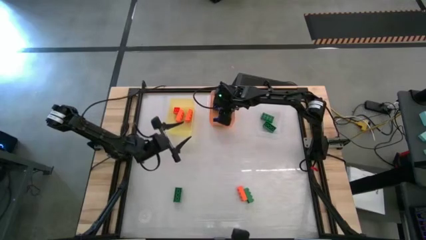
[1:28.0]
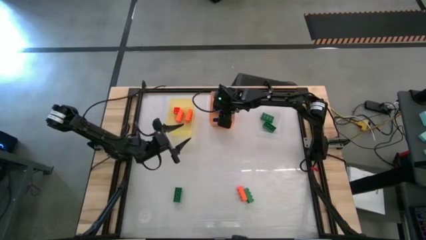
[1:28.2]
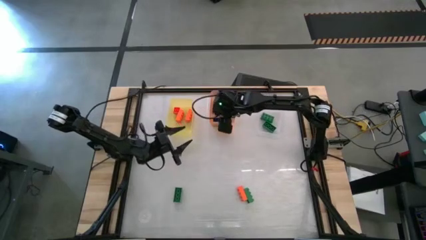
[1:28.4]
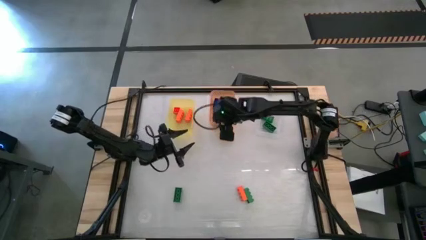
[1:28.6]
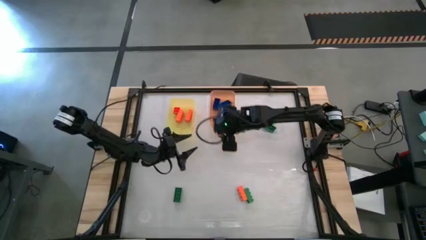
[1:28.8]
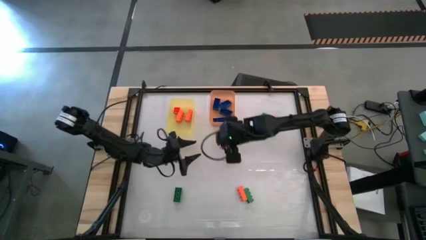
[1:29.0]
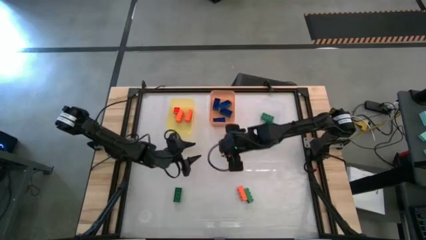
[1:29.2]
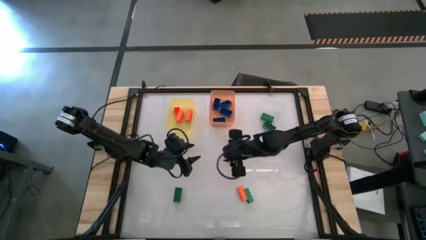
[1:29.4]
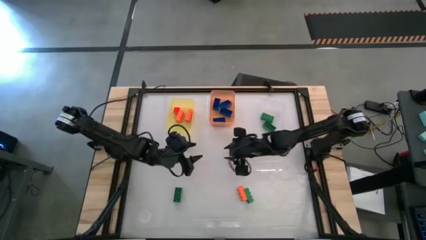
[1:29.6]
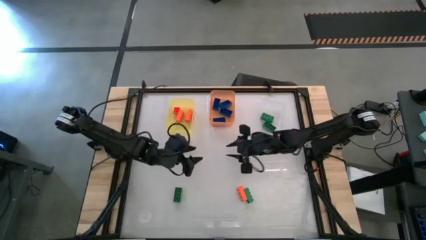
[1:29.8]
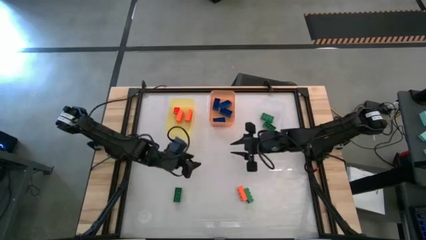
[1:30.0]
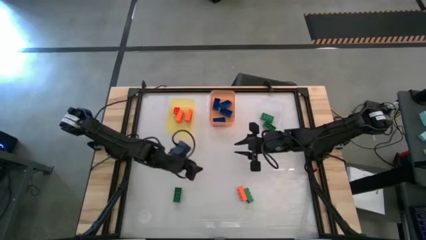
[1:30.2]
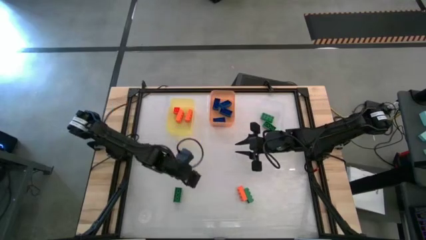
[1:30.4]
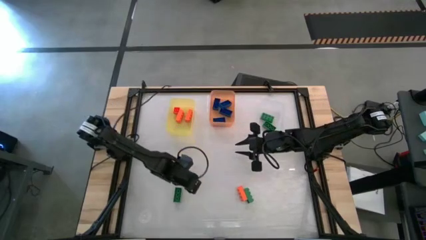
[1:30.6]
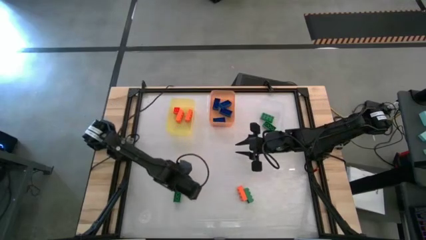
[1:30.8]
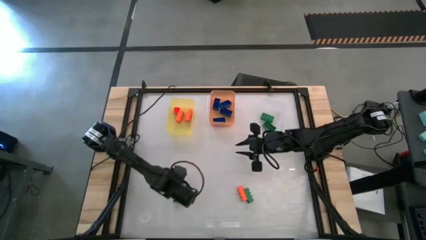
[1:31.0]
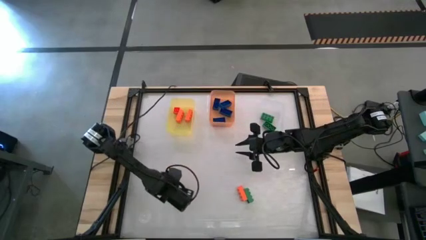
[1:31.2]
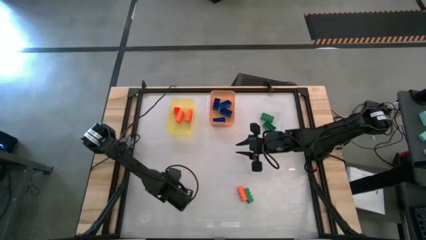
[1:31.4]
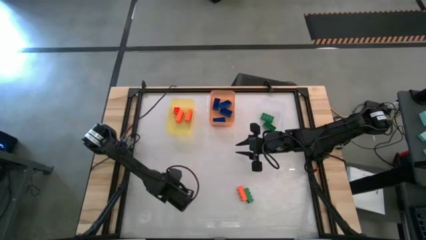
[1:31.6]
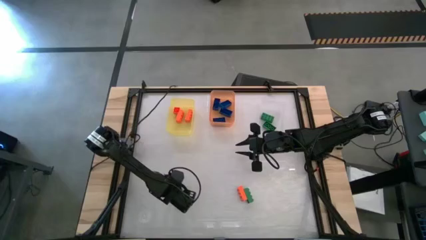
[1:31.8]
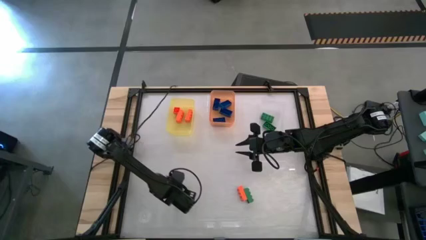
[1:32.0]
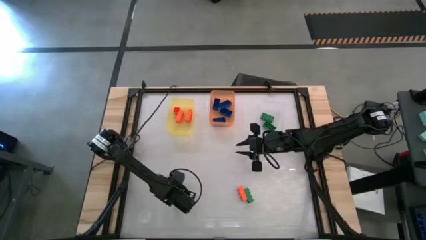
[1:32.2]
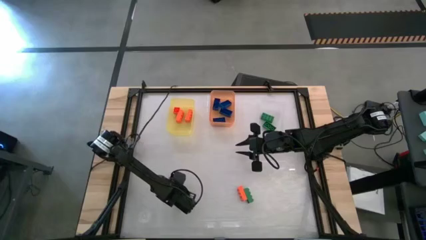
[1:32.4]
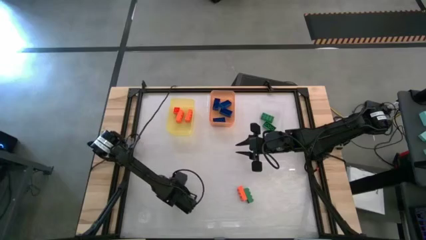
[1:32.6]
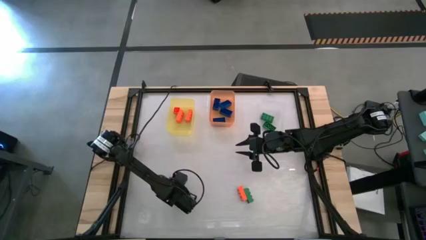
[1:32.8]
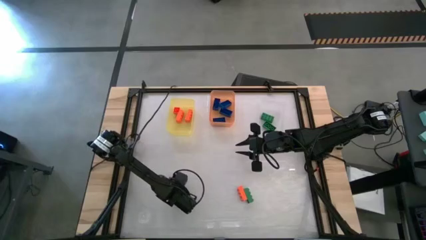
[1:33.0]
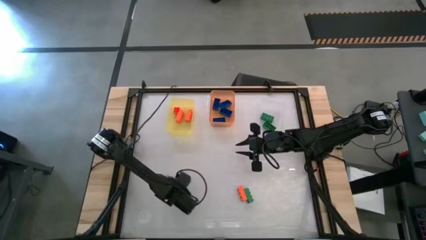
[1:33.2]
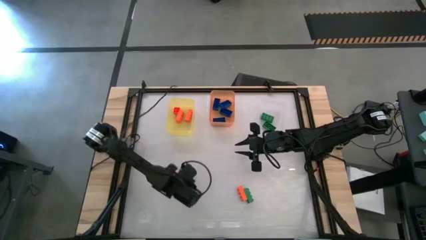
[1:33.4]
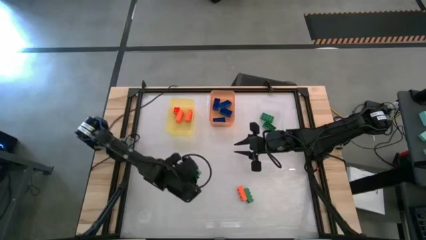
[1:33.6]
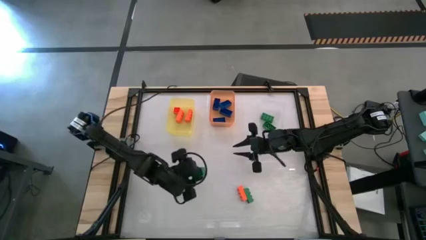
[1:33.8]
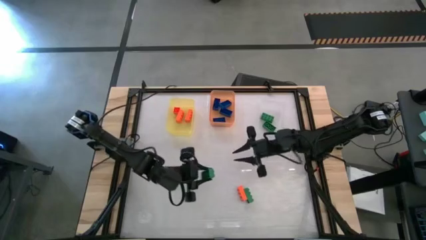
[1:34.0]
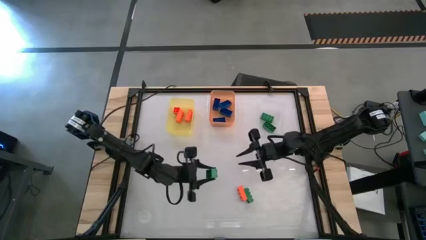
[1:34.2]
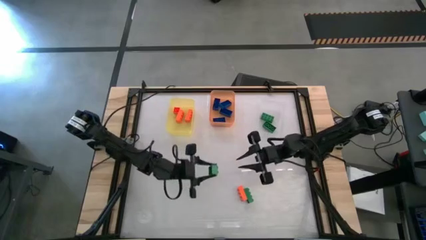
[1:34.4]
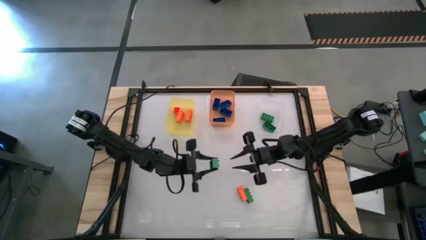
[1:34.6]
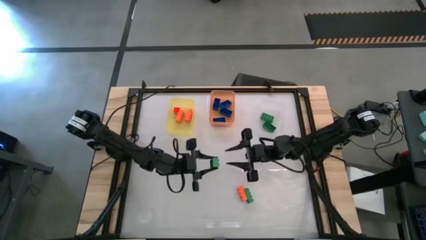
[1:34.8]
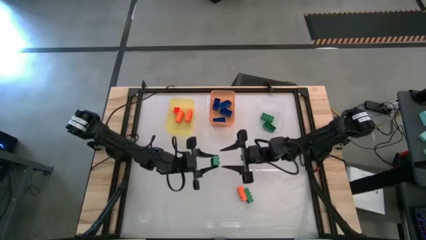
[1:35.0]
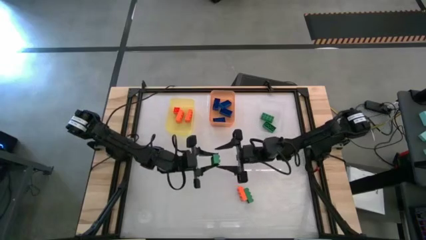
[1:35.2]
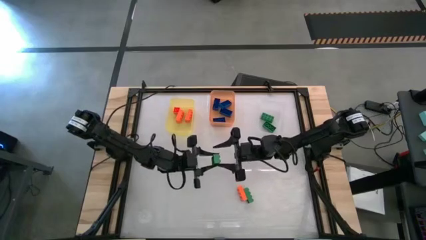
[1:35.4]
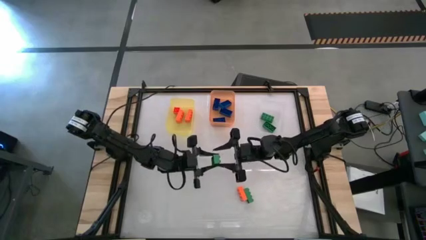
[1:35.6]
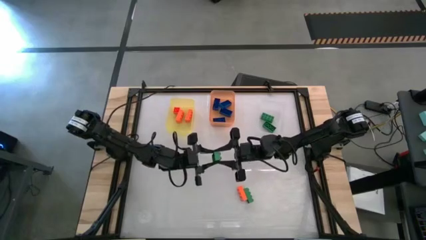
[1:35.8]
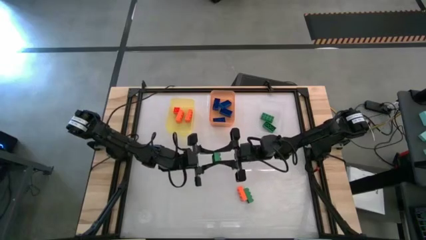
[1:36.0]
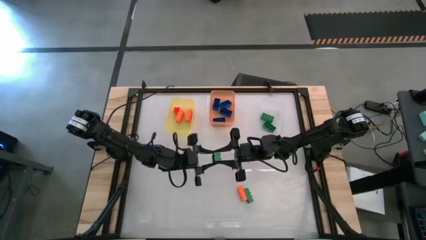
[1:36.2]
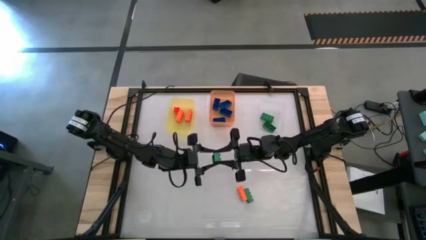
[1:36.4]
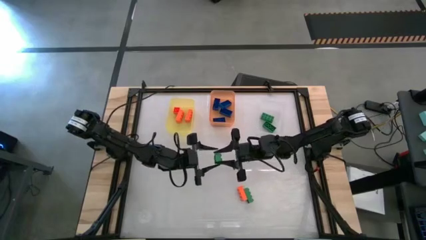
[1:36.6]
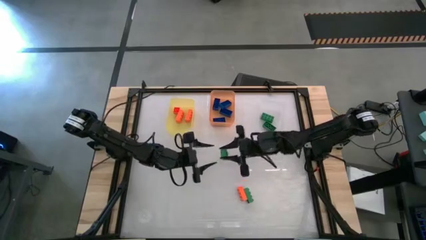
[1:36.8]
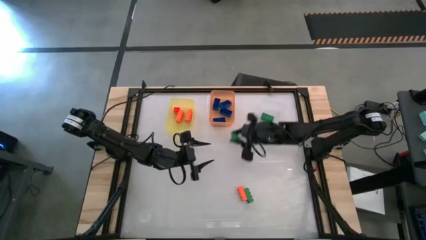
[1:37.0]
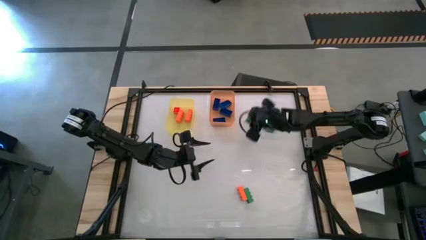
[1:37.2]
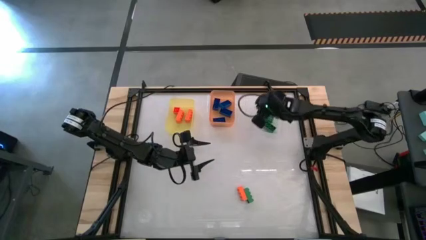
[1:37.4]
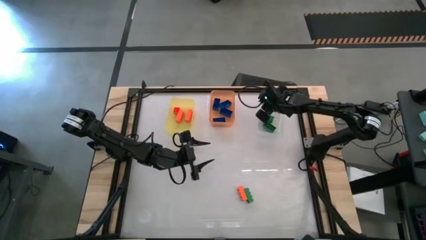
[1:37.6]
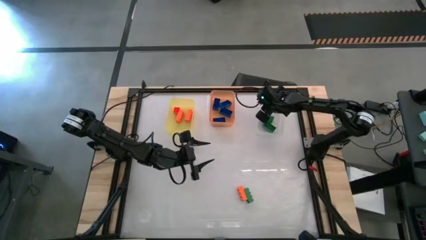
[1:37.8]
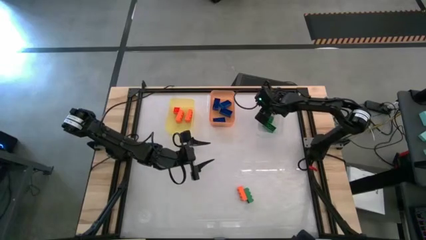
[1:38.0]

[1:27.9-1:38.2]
Task: Sort & place blocks by color
Put the green game piece into the transparent bin

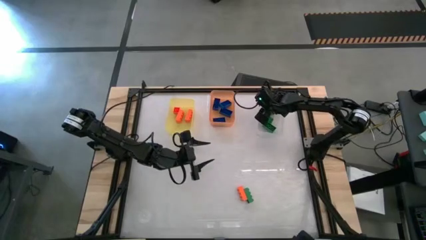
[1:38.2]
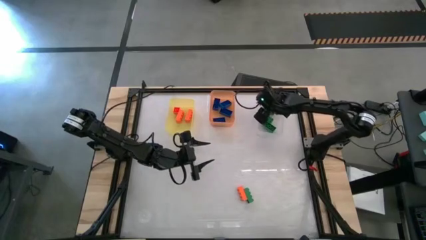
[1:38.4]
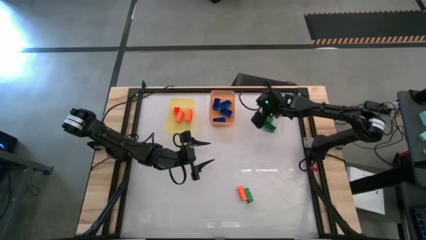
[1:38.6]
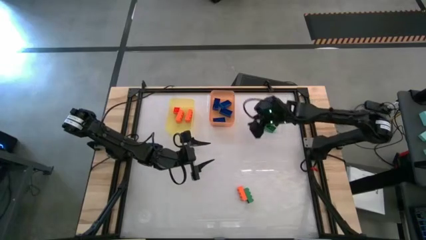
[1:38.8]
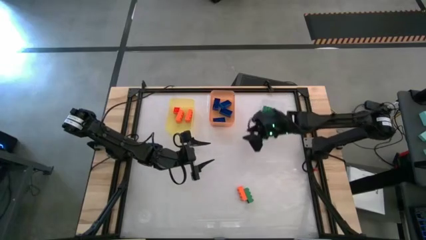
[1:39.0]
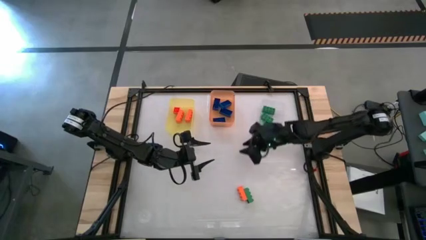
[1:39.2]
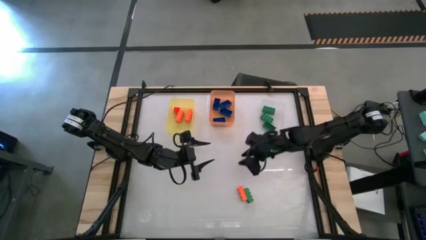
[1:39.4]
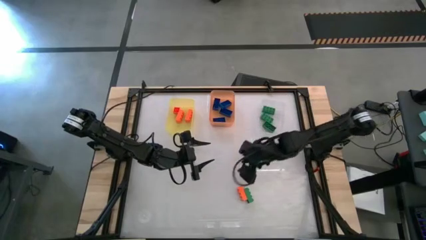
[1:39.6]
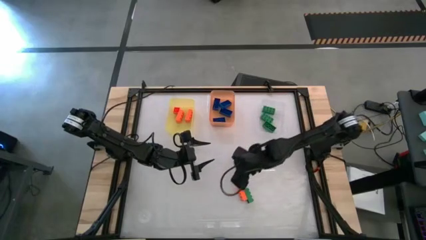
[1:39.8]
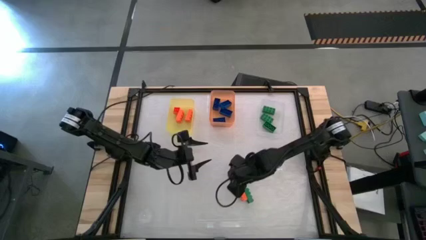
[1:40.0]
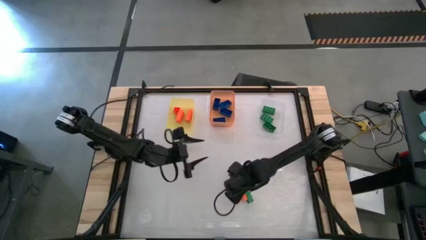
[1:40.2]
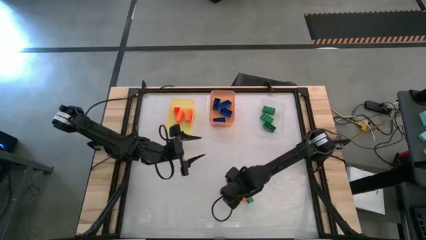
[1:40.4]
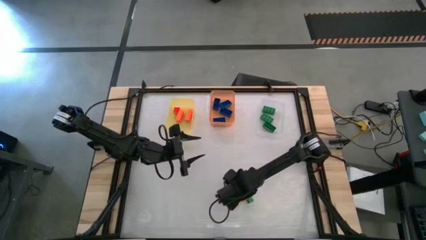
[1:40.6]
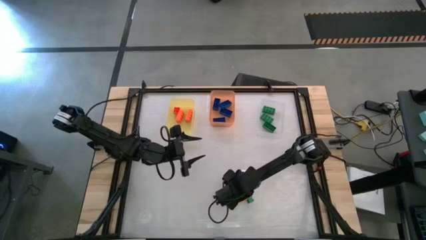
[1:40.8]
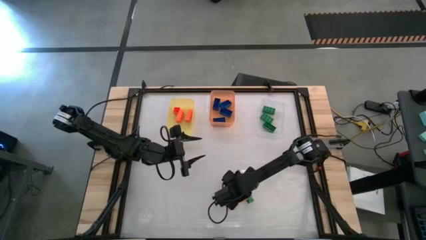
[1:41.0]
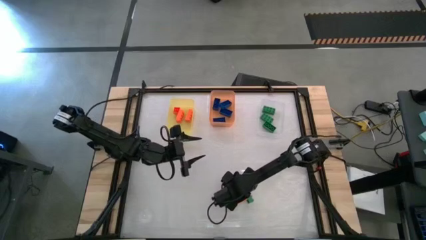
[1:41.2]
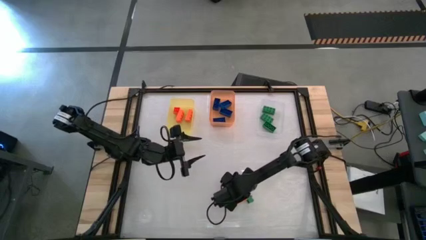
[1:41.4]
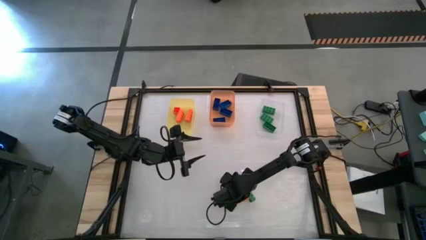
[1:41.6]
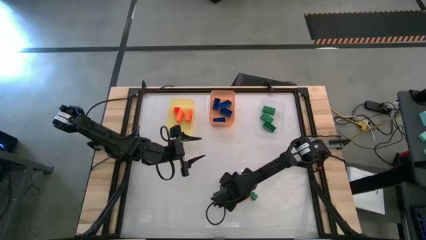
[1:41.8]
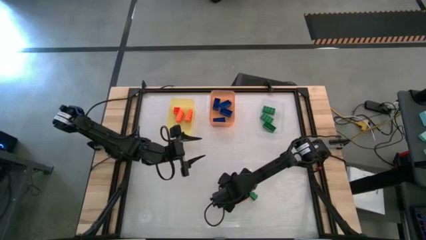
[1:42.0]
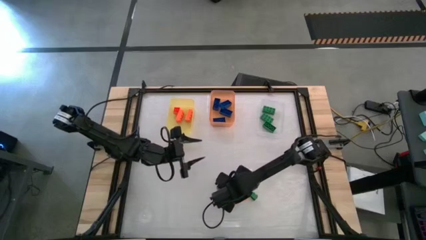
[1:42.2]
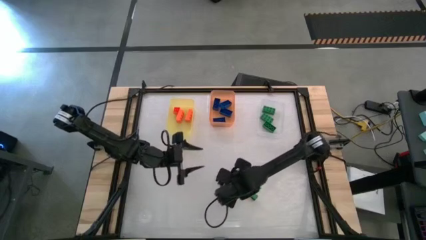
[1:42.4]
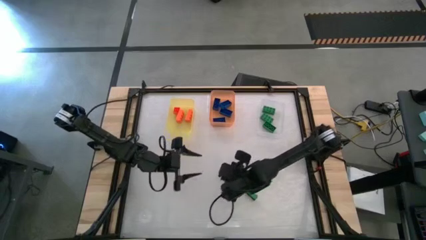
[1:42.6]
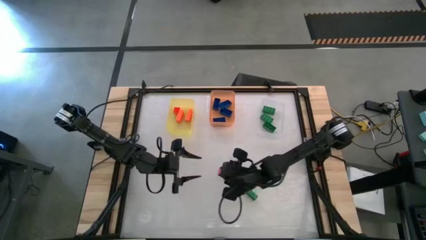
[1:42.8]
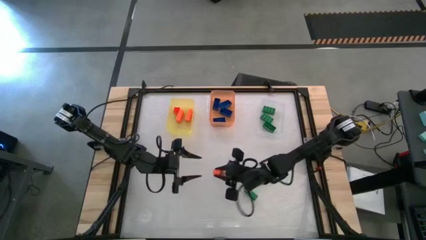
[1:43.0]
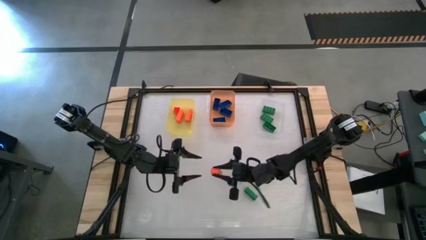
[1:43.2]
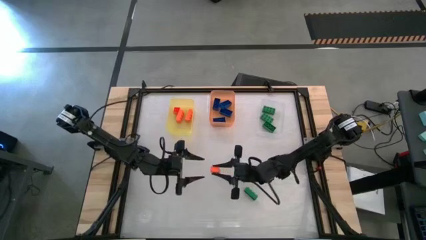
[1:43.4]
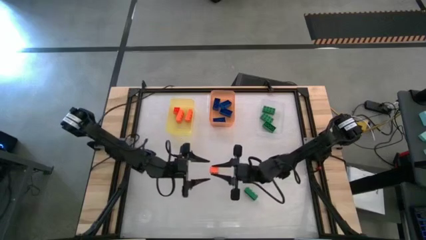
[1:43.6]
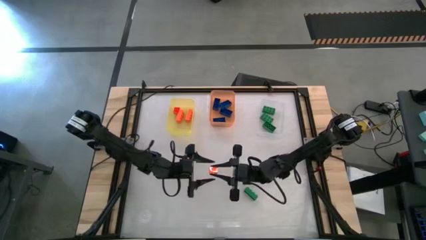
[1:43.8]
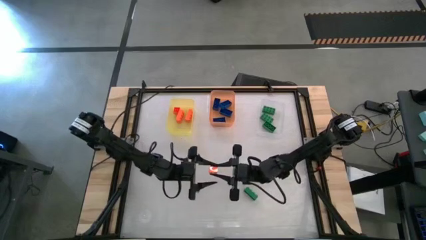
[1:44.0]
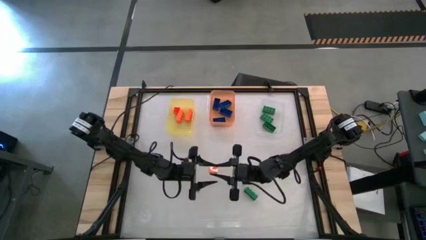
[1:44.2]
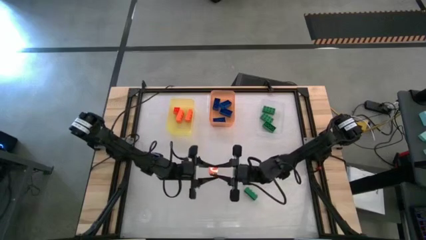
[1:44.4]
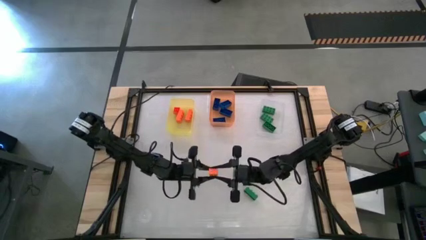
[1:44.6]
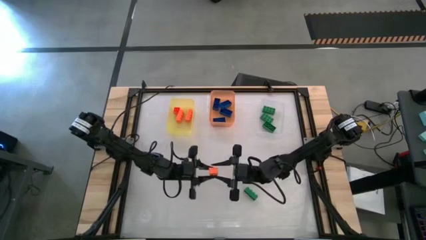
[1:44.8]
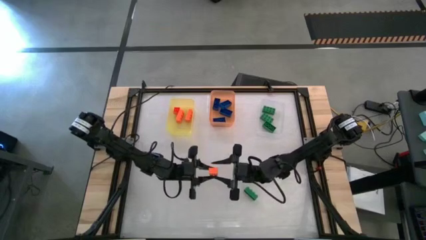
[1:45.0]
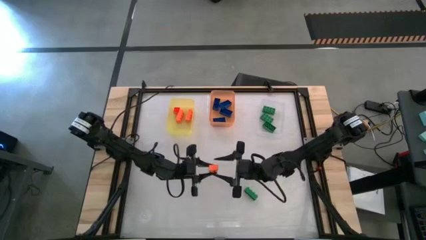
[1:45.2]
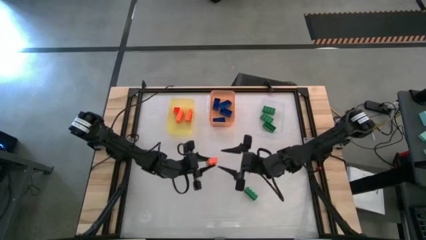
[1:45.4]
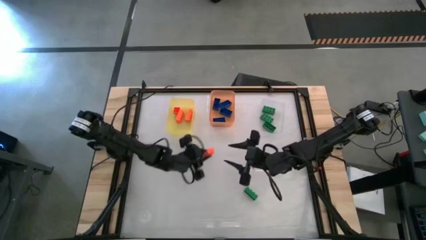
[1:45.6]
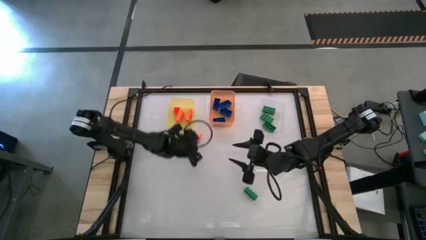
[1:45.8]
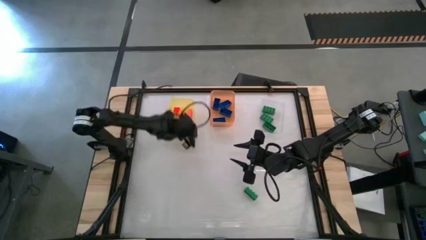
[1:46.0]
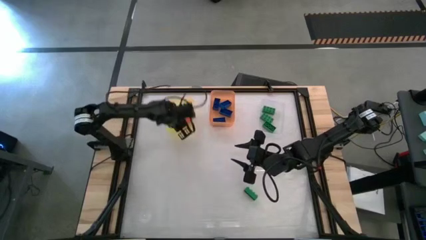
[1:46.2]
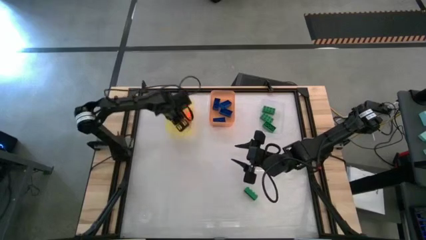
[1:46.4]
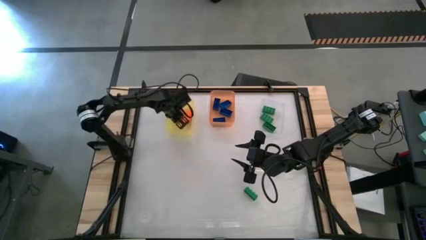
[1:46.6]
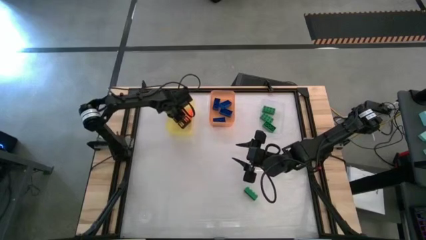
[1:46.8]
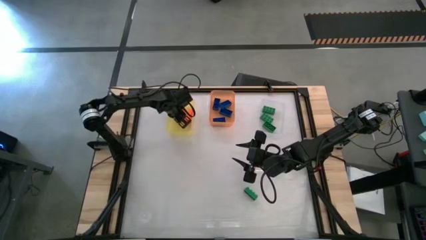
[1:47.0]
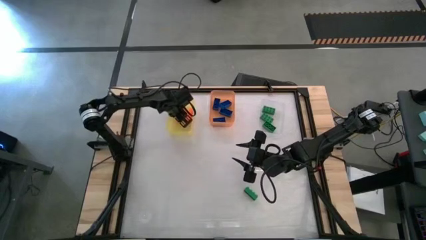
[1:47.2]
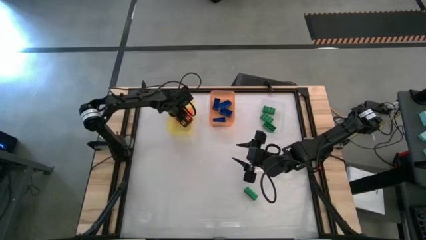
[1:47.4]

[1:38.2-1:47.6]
Put the orange game piece into the yellow bin
